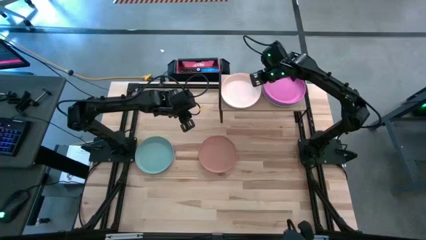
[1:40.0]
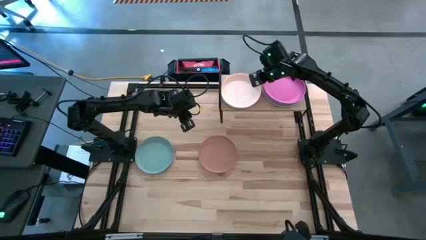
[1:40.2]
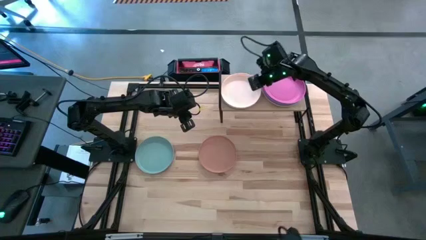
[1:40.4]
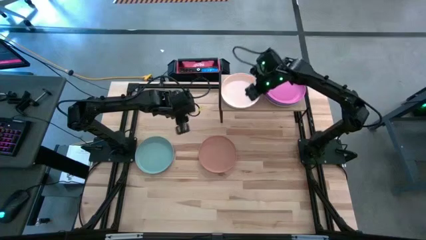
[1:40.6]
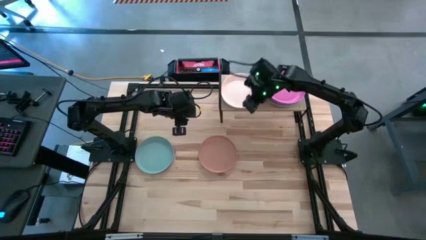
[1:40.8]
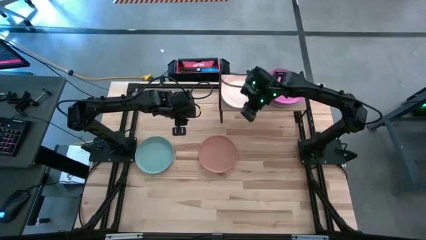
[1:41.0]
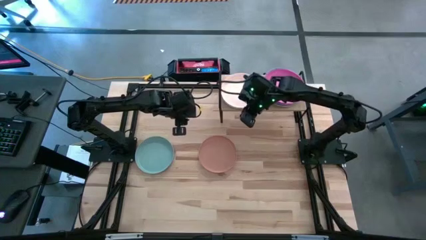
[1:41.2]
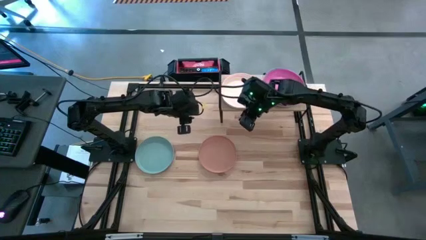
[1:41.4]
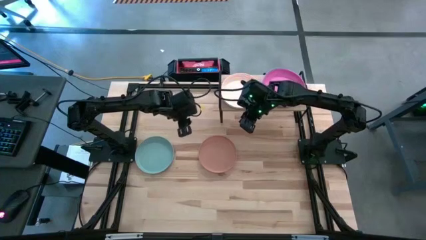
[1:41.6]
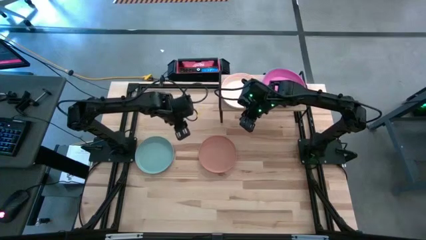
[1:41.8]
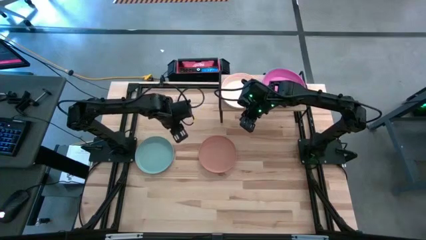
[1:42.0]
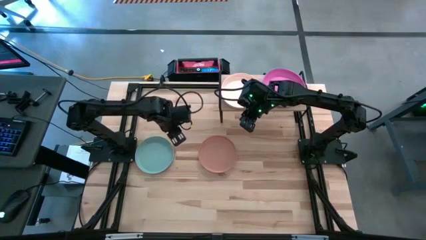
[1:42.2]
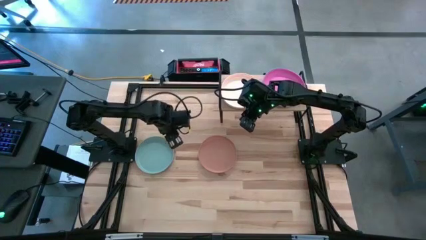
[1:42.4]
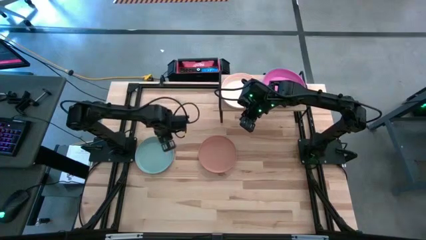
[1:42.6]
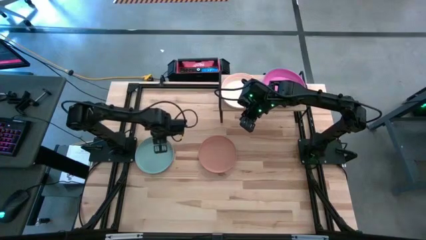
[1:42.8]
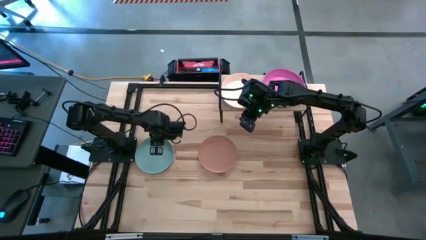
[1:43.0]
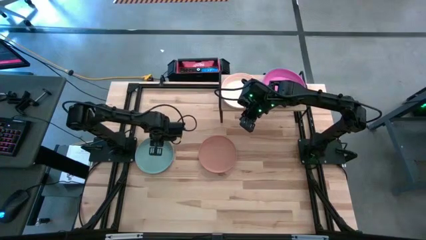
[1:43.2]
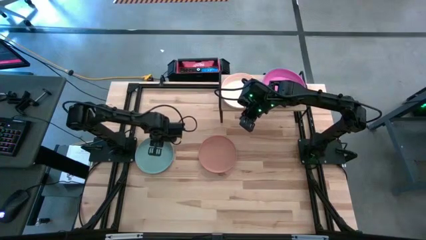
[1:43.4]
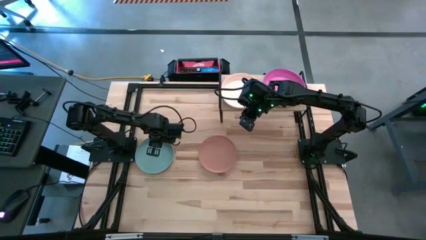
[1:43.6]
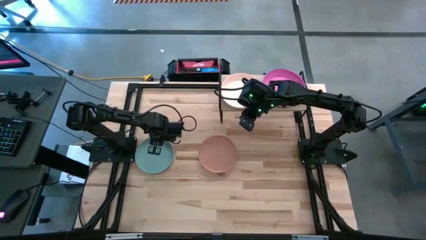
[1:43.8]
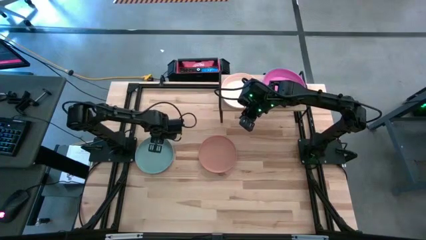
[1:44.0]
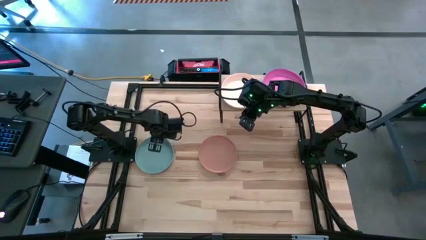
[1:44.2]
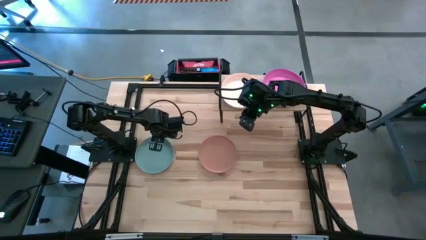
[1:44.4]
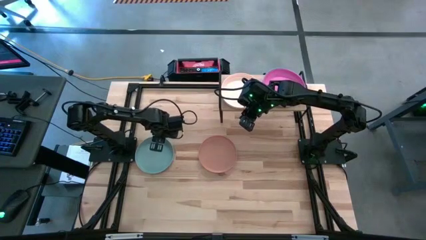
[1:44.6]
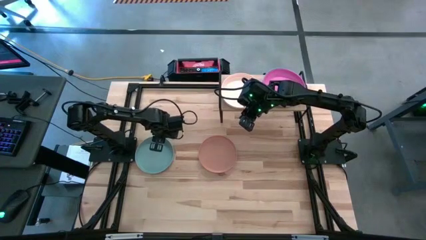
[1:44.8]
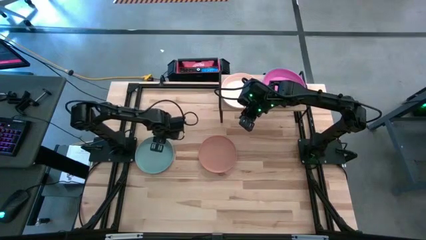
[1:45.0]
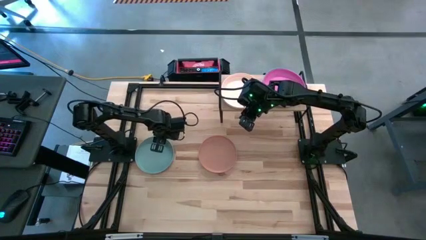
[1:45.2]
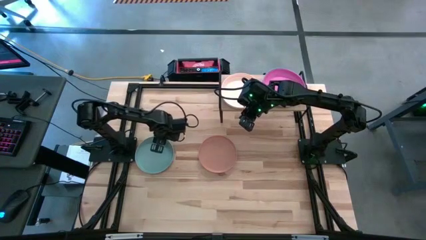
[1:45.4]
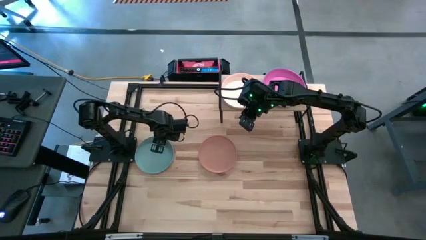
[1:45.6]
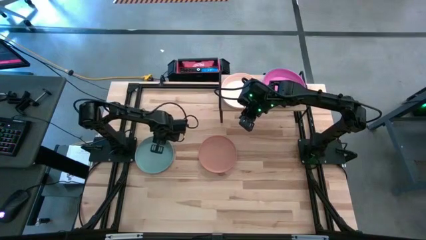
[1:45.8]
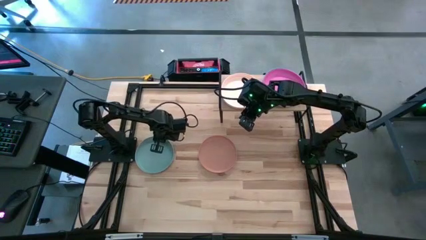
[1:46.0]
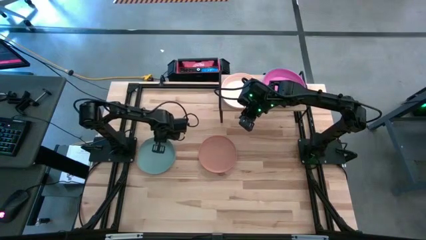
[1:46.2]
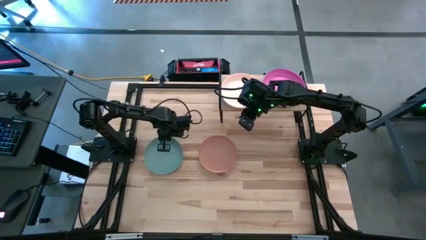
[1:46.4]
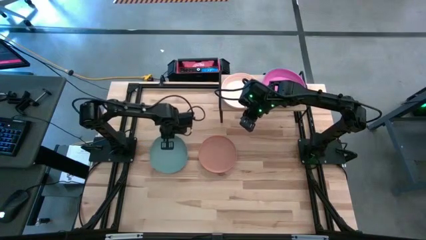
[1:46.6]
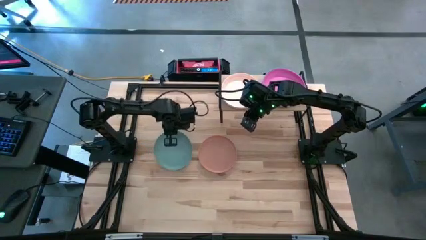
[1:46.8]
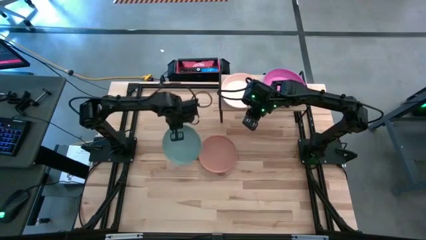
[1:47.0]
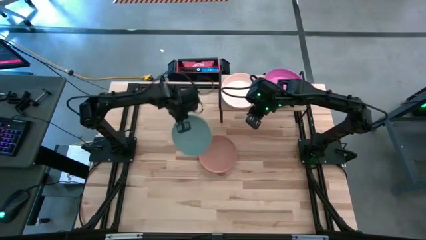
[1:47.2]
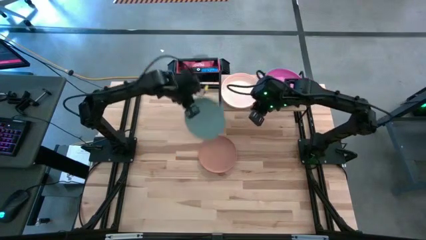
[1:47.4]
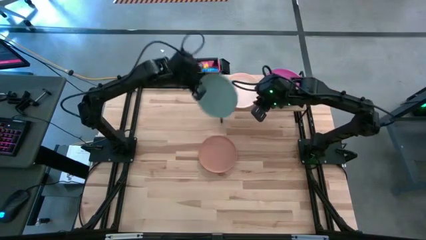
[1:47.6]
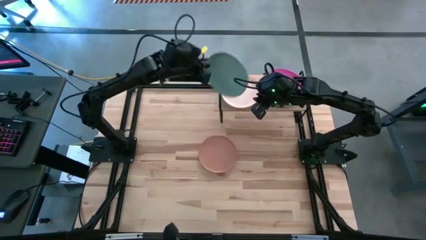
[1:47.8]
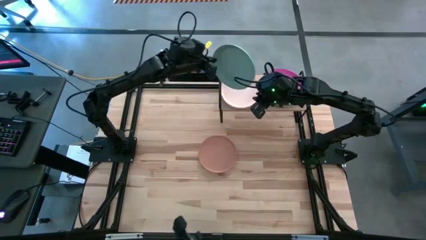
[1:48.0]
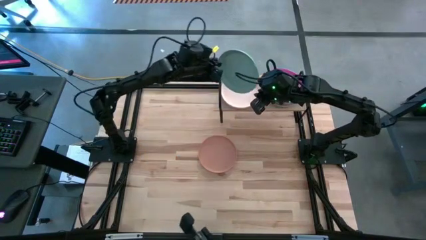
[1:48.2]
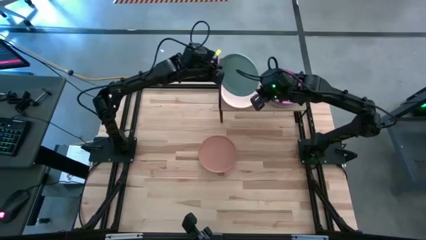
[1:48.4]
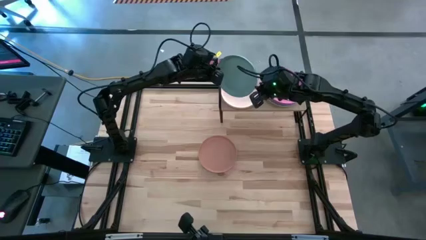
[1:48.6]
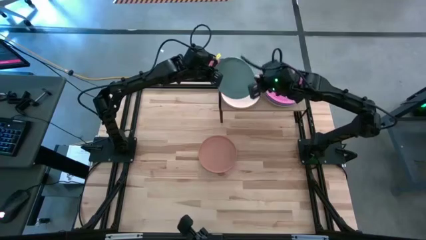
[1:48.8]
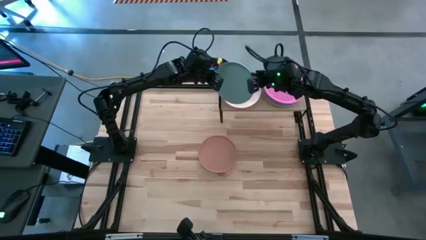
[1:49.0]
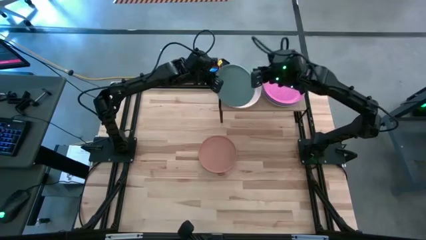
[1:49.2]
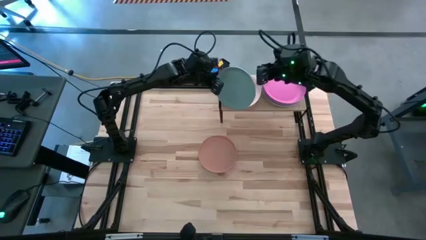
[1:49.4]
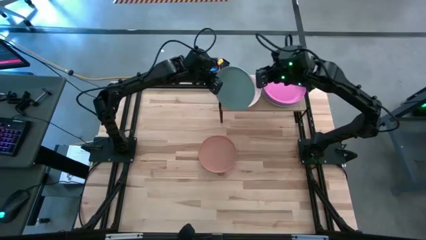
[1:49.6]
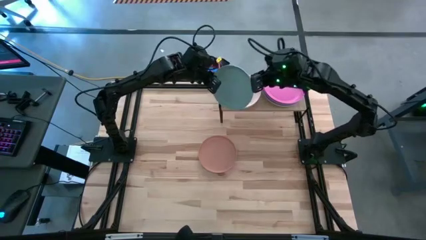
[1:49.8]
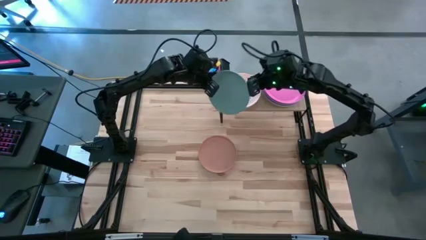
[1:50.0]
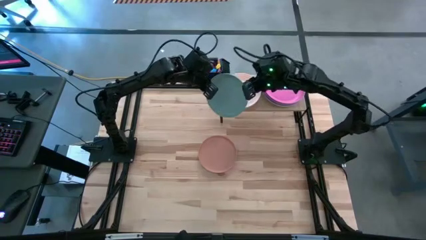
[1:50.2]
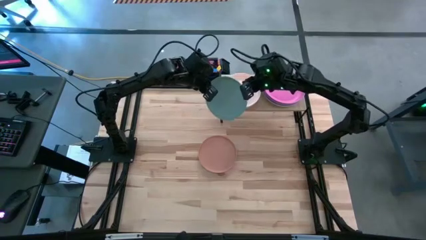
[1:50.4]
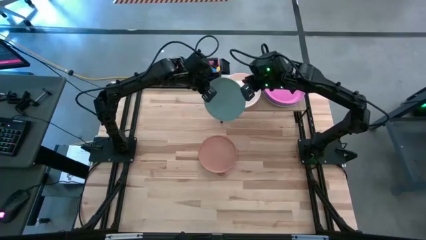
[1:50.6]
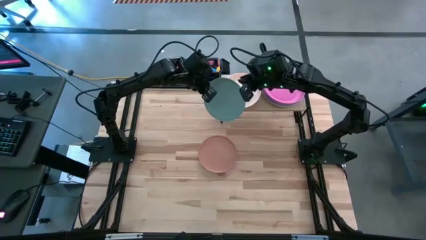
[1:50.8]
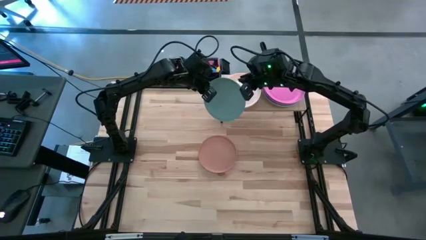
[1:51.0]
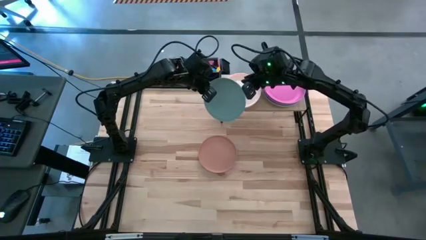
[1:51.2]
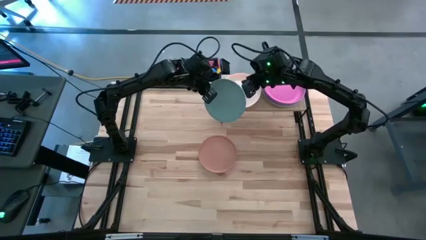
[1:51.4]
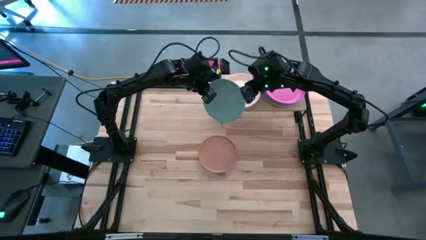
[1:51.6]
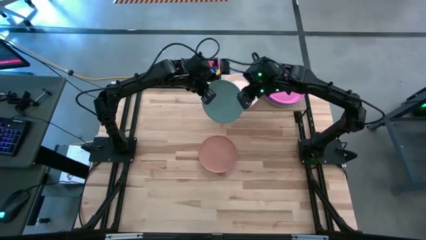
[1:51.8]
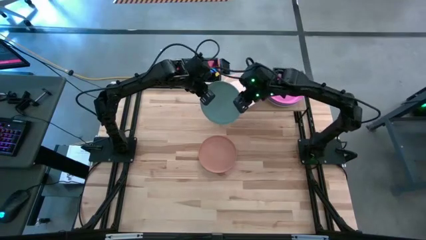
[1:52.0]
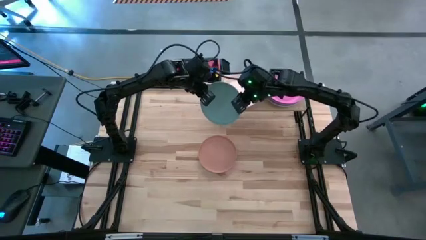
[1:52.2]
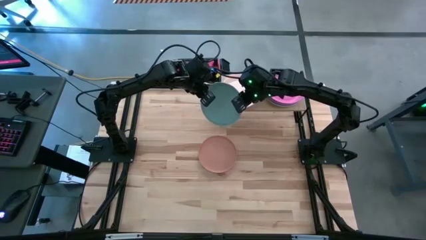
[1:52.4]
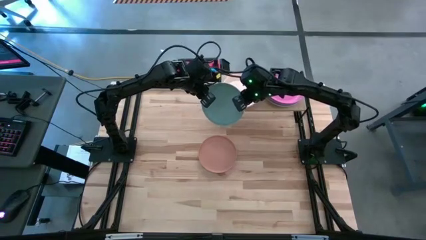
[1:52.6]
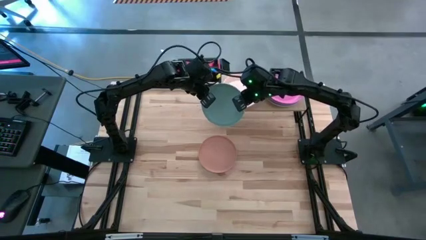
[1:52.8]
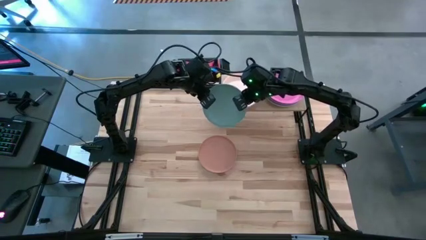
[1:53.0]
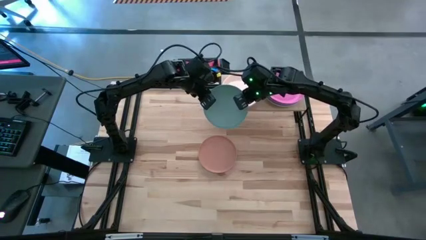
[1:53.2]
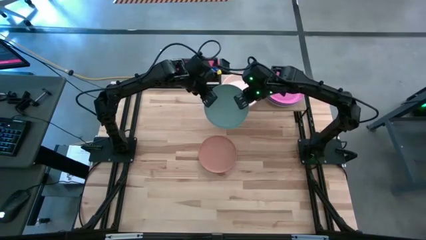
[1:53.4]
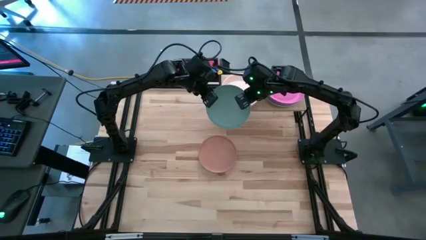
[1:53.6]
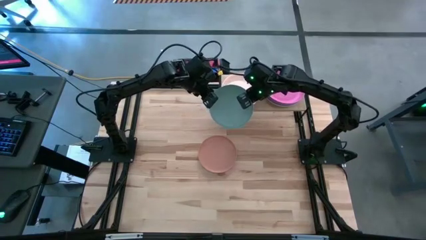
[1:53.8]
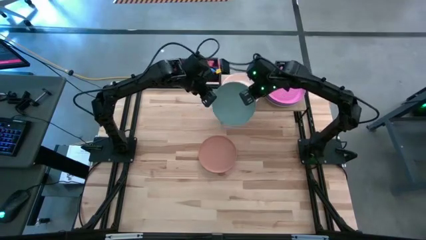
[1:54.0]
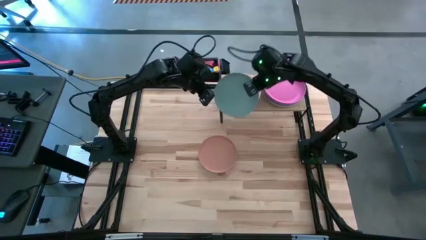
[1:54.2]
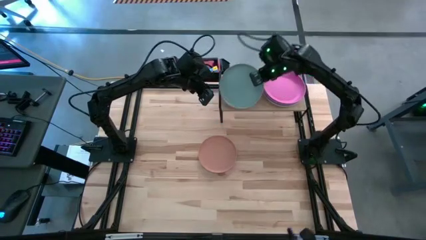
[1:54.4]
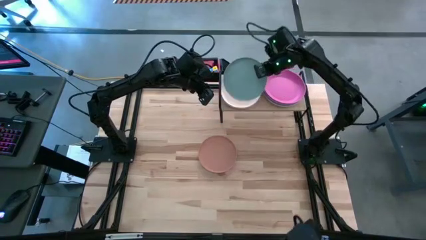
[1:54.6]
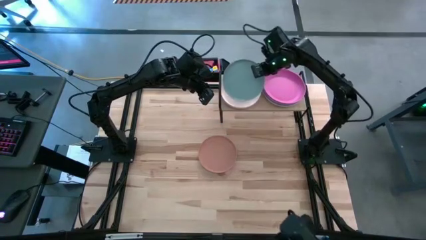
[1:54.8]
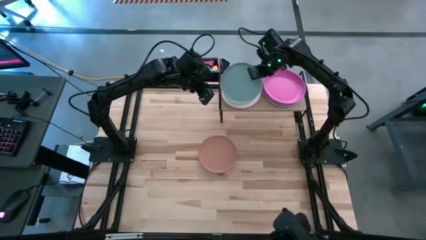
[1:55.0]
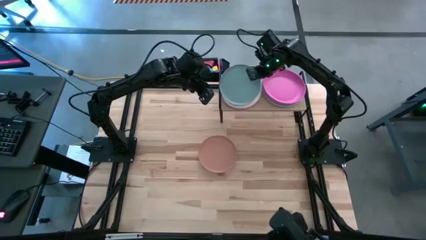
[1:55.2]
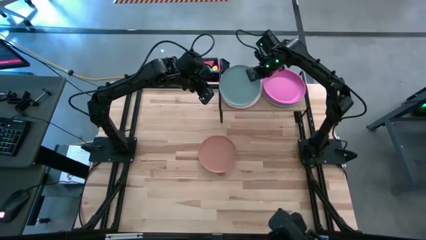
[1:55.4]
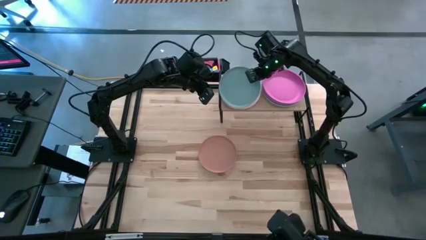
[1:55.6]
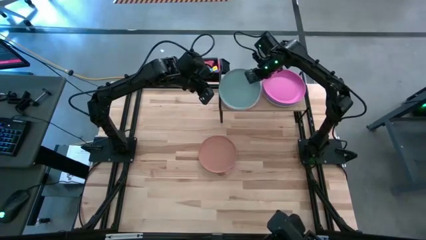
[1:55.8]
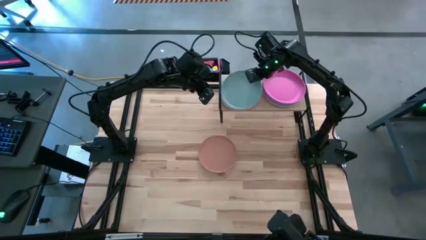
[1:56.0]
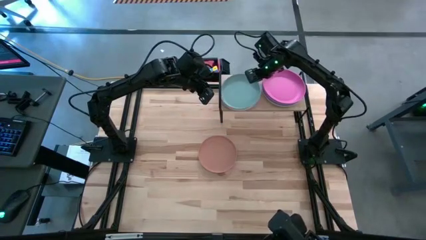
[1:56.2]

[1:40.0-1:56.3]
Task: Place and stack plates onto a shelf
Stack the light blue plate on top of the light orange plate on the shelf

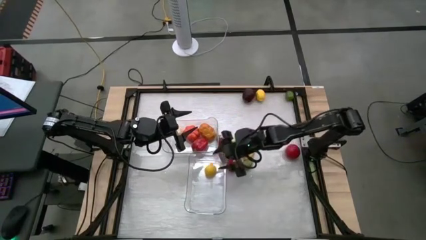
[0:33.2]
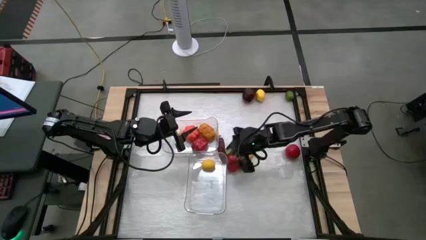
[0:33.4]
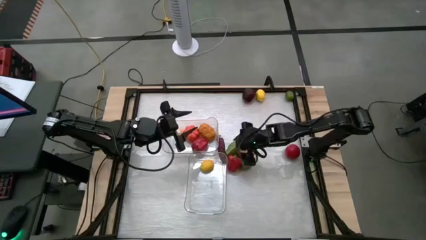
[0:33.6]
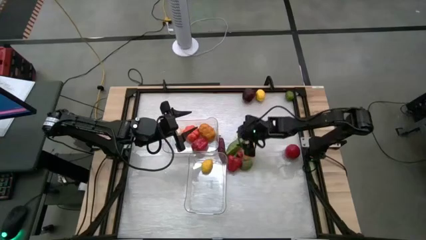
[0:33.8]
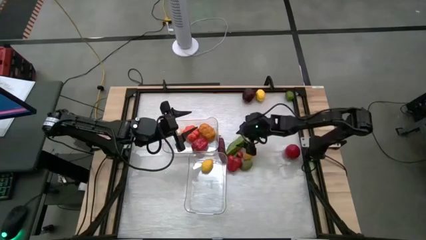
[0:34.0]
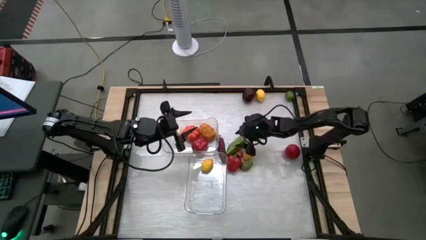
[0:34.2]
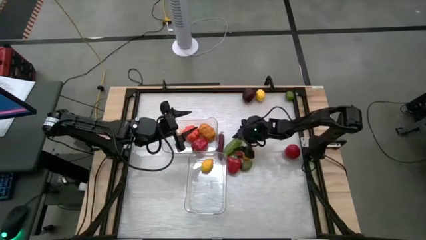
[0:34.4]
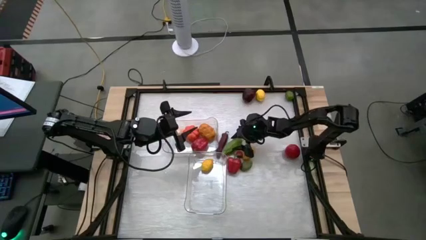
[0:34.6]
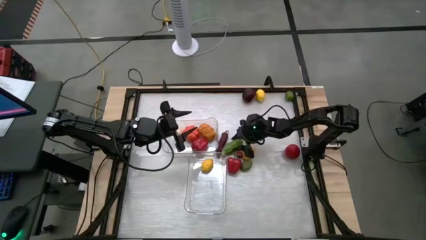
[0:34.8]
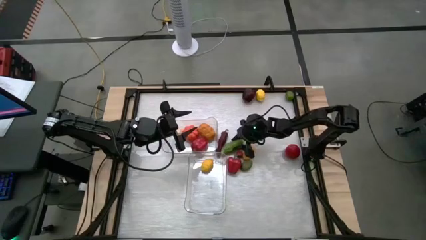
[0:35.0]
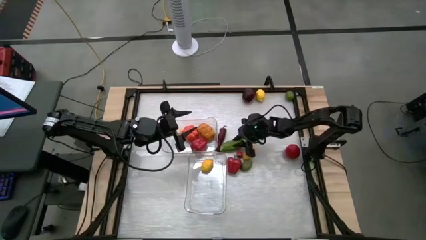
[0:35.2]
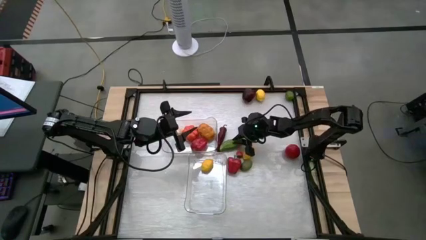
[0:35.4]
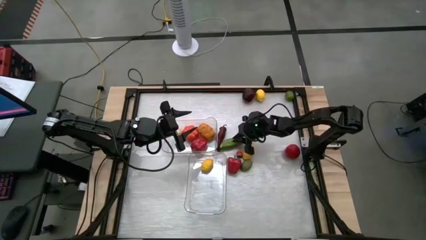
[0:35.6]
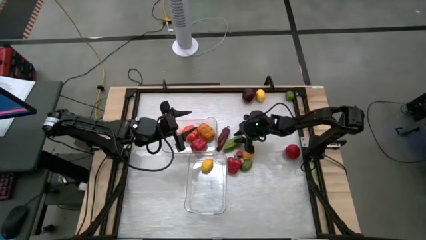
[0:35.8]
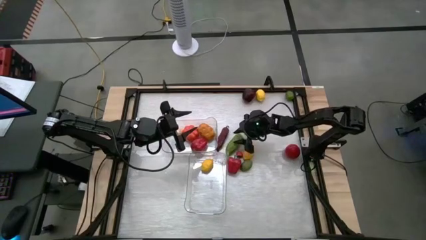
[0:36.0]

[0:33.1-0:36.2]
Task: Sort produce into baskets
Put the cucumber into the top transparent bin
